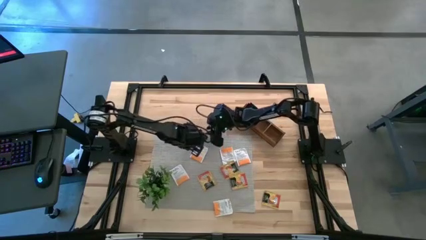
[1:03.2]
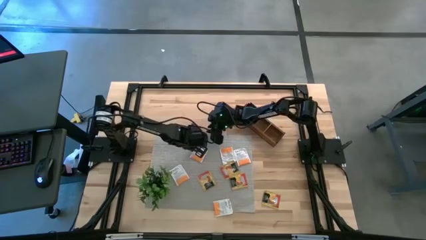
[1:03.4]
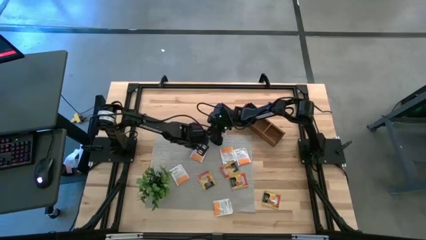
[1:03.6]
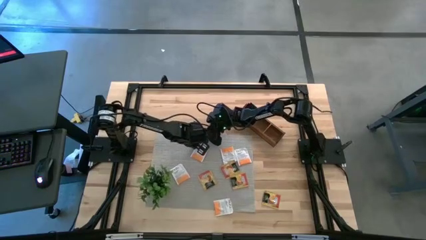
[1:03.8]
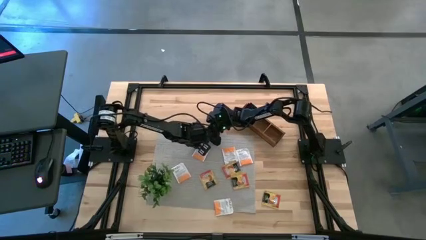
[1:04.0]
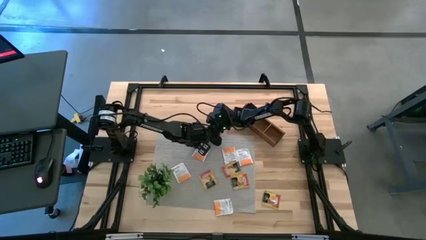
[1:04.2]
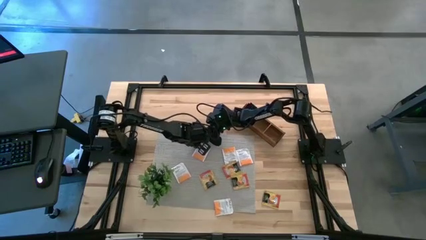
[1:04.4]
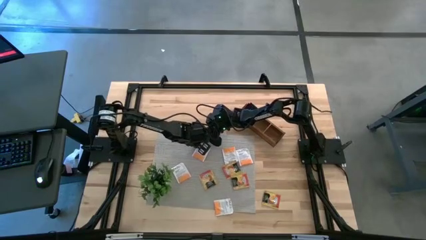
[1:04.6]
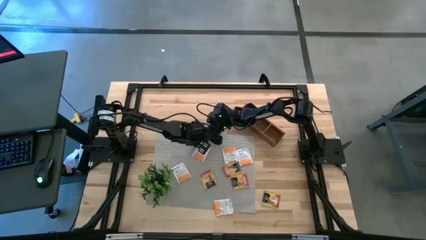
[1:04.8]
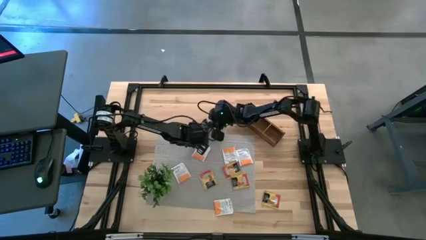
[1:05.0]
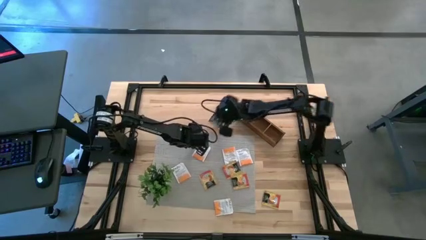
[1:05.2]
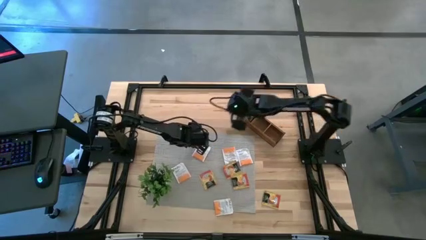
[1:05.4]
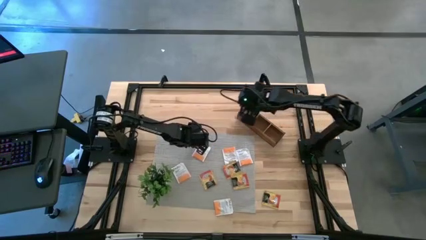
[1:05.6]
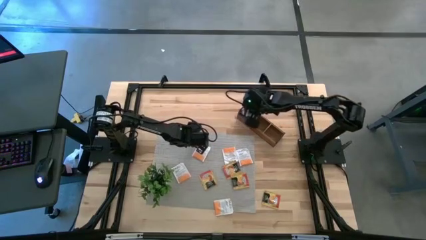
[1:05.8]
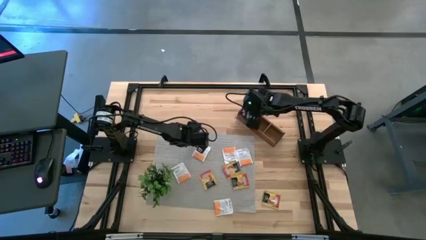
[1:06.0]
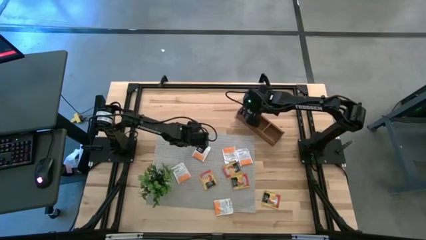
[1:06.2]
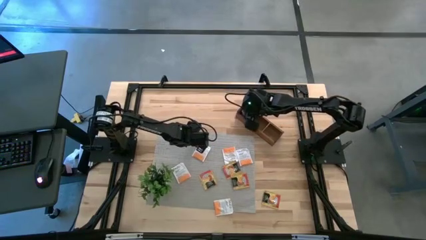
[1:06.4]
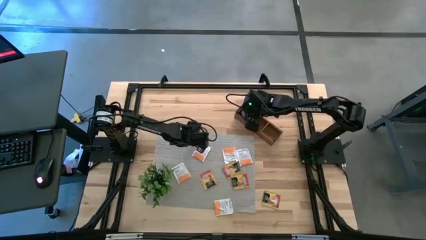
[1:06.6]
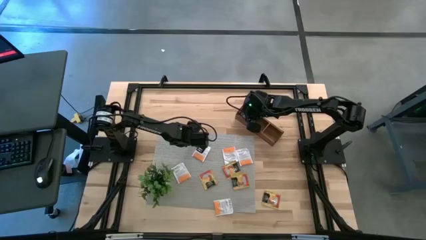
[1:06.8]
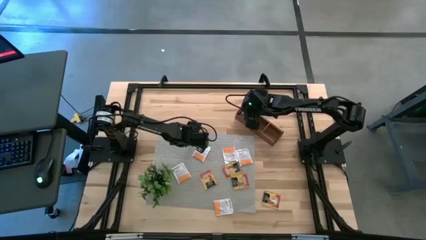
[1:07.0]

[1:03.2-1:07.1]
Task: Pick & Place Tea
Put the black tea bag into the left section of the wooden organizer

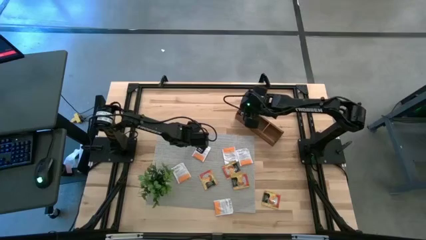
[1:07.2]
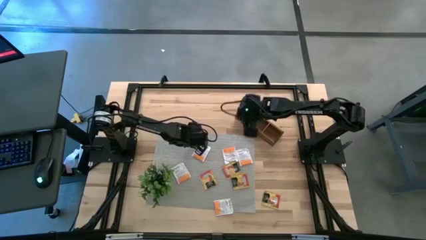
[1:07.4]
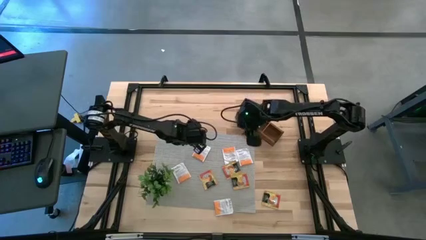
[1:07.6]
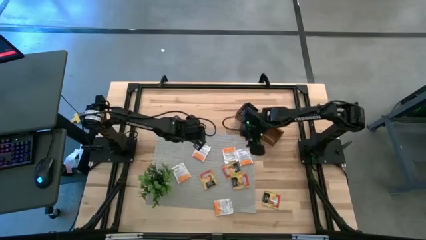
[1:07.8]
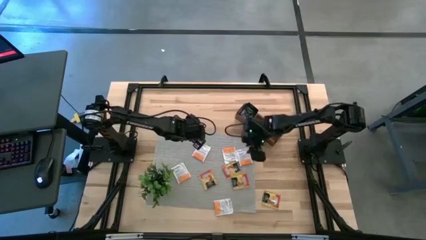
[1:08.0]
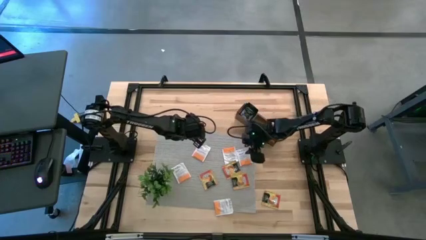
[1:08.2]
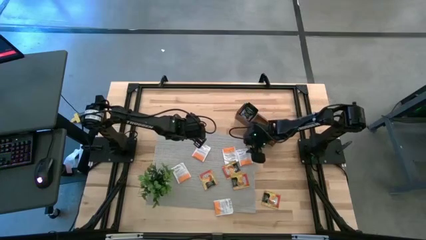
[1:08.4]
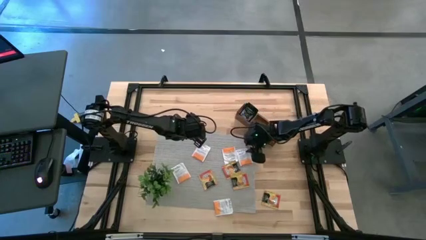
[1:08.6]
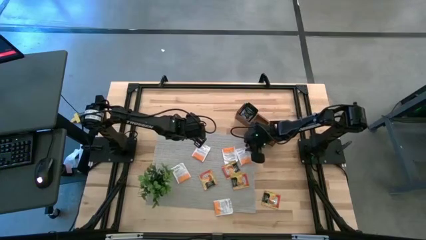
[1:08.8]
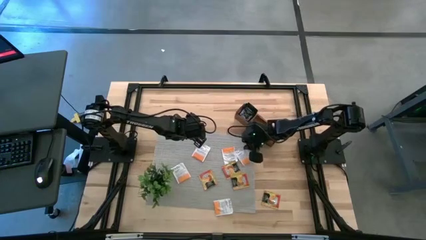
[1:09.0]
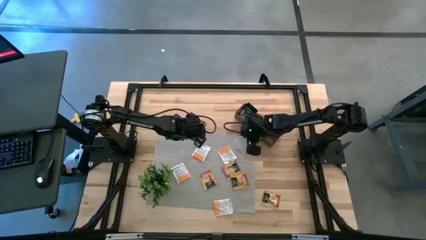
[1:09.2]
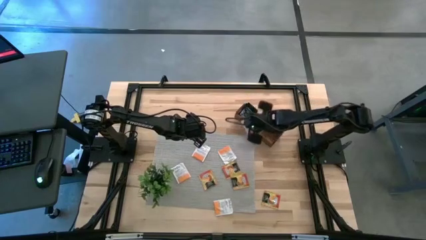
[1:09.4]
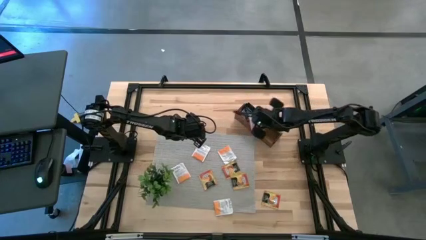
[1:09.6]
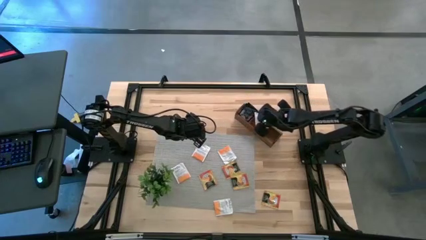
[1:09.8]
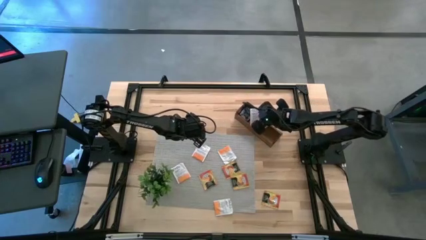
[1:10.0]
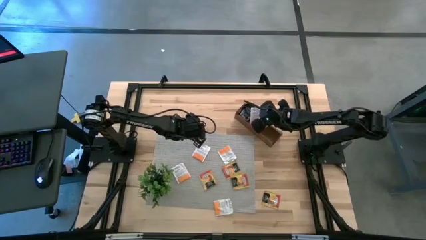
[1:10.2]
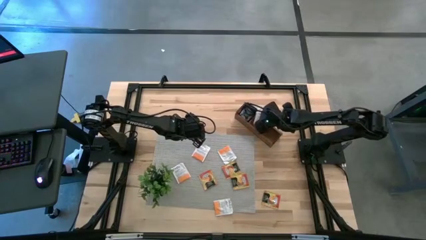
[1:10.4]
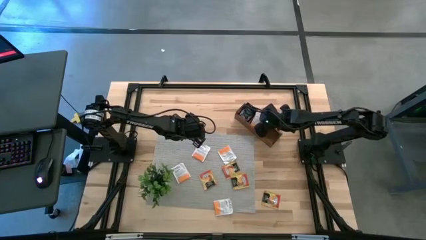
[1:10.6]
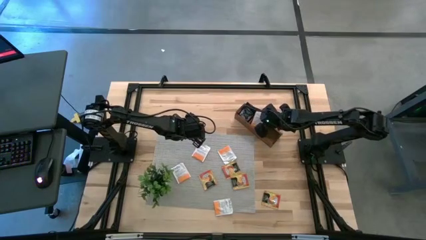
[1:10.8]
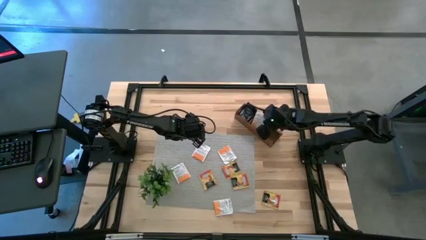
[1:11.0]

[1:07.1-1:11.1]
Put the orange tea bag into the middle section of the wooden organizer

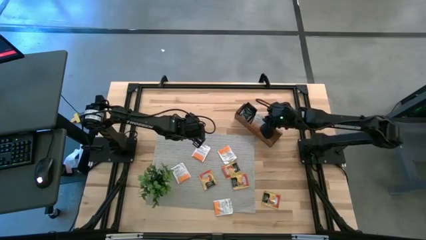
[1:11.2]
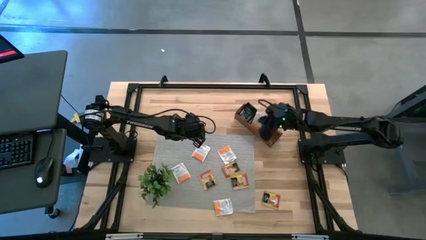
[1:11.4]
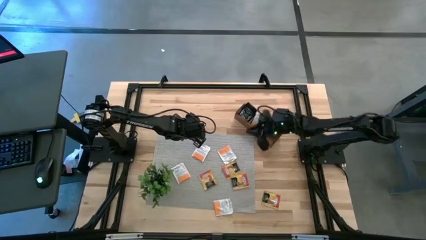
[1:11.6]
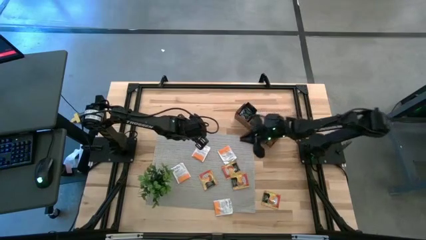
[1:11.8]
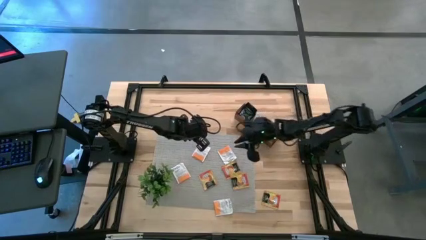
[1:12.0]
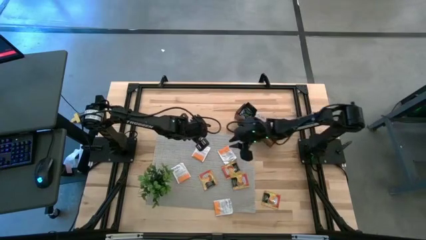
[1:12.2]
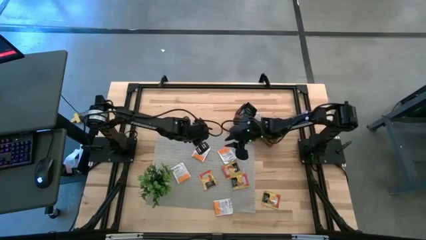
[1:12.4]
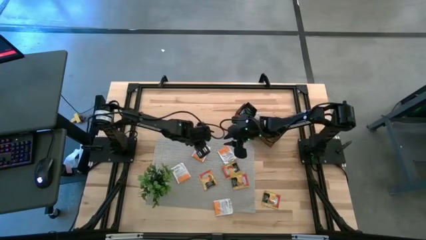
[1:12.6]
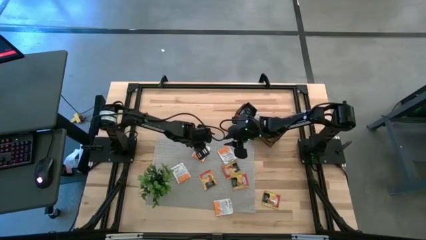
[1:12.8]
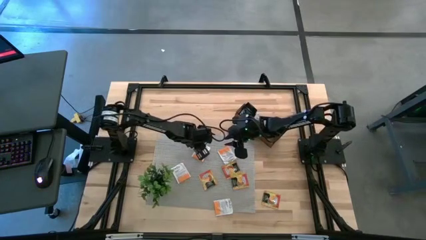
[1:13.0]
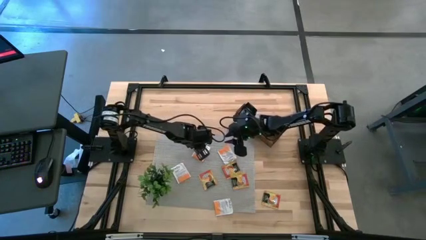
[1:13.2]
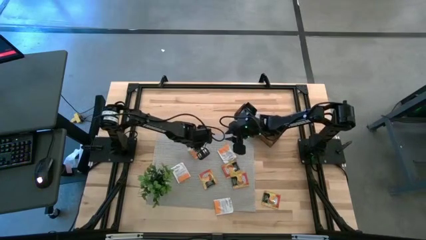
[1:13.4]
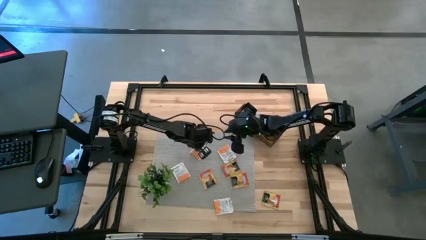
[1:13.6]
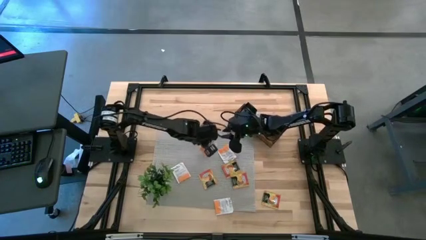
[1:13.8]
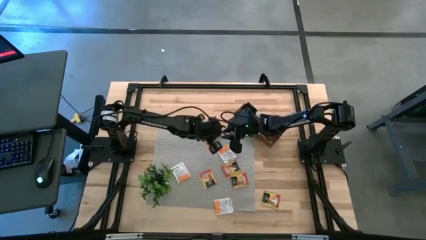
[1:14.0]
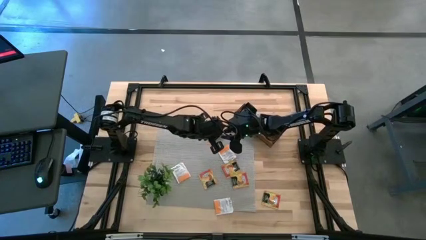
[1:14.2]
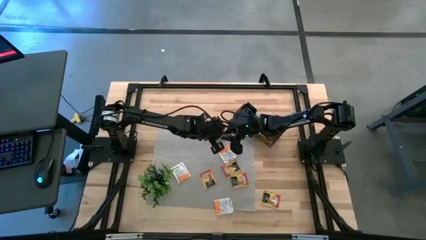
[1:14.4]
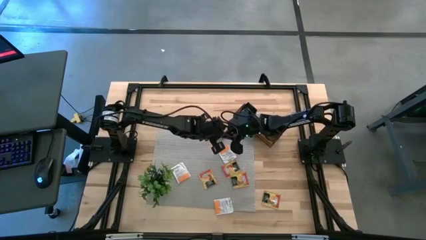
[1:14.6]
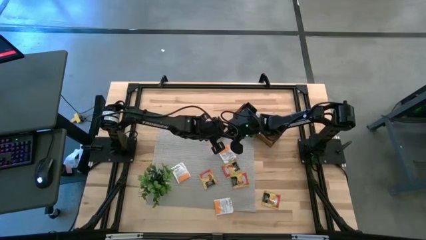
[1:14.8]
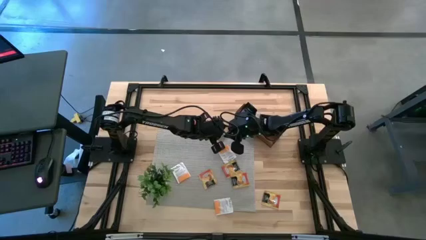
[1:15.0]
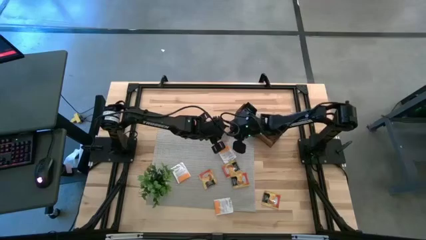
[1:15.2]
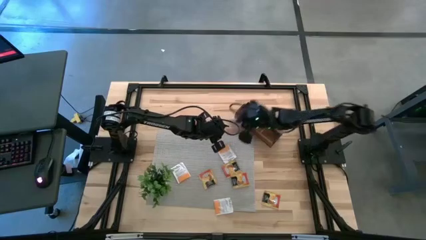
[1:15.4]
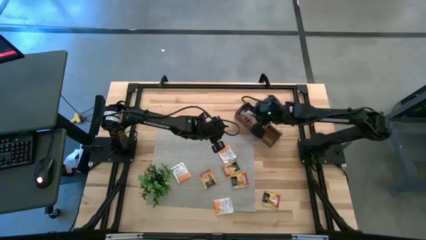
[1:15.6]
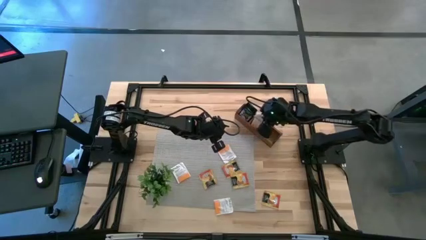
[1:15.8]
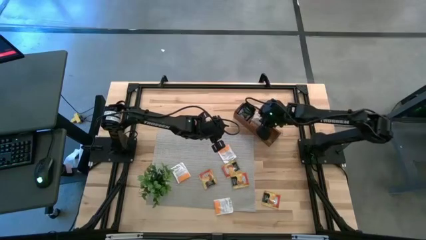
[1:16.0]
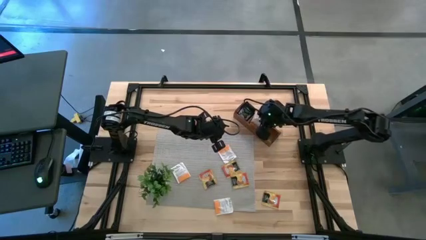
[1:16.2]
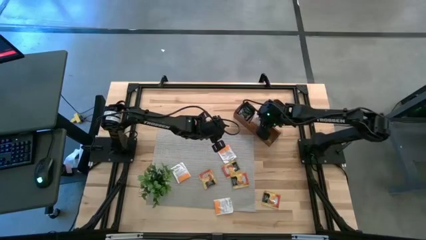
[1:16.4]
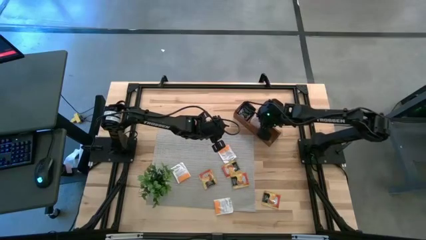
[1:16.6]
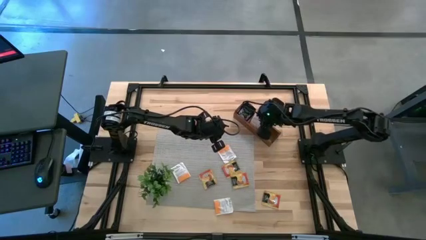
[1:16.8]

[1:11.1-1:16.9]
Put the orange tea bag into the middle section of the wooden organizer

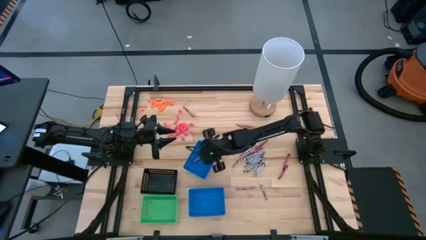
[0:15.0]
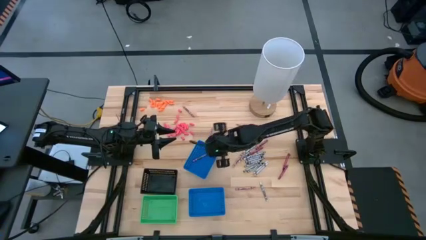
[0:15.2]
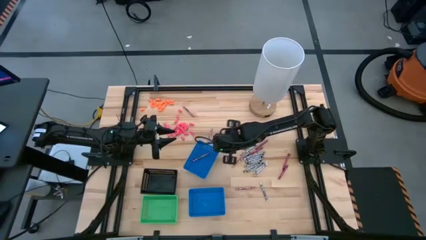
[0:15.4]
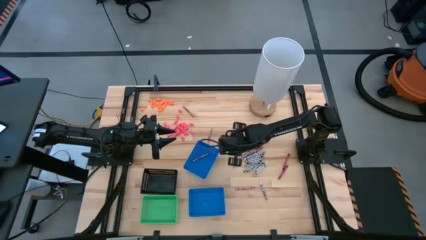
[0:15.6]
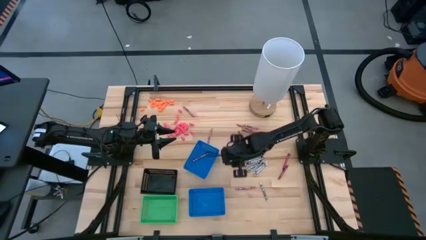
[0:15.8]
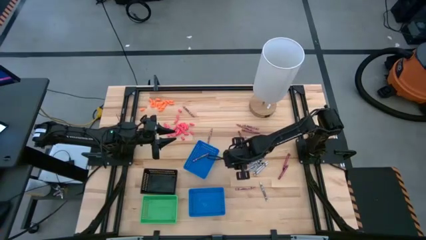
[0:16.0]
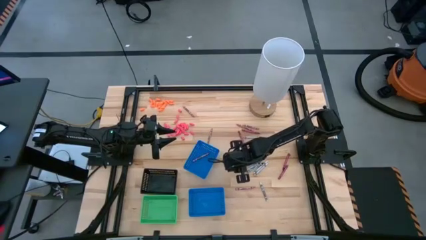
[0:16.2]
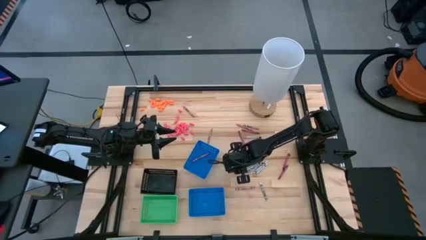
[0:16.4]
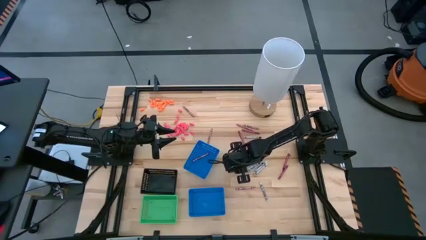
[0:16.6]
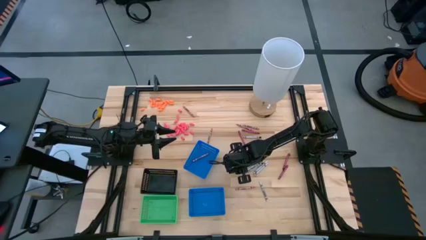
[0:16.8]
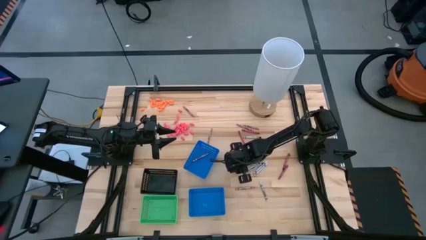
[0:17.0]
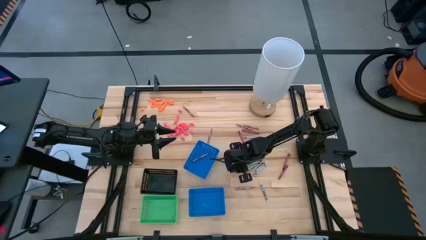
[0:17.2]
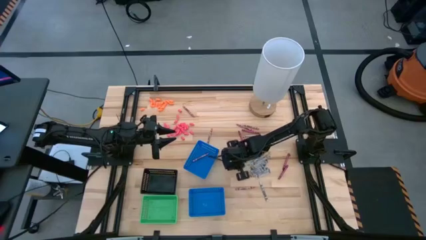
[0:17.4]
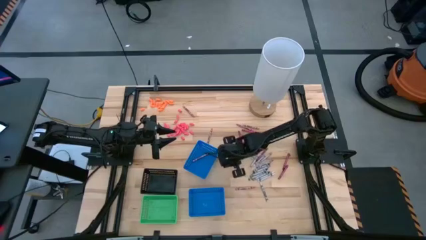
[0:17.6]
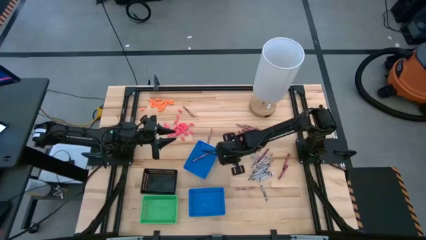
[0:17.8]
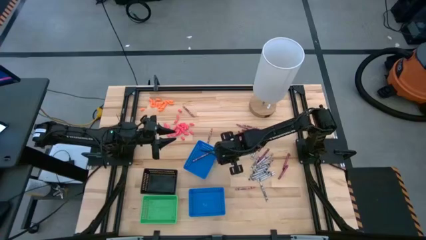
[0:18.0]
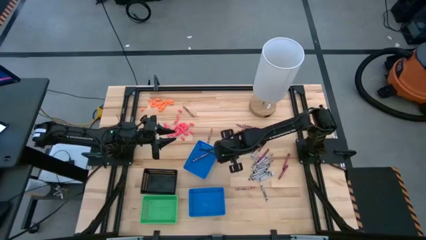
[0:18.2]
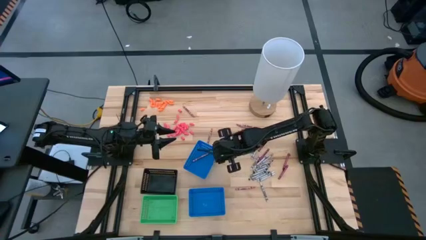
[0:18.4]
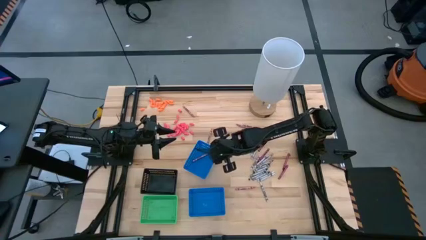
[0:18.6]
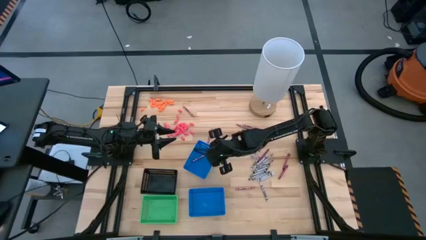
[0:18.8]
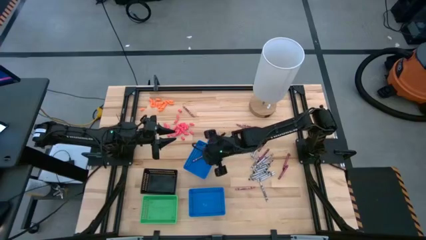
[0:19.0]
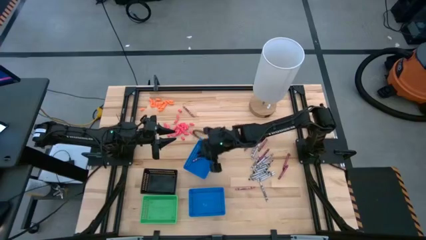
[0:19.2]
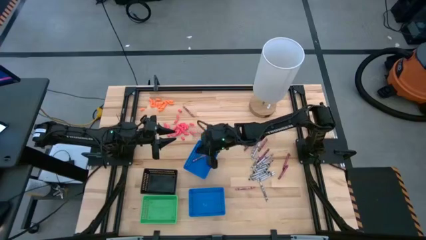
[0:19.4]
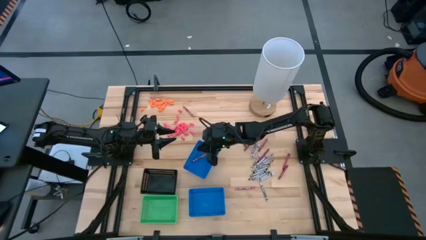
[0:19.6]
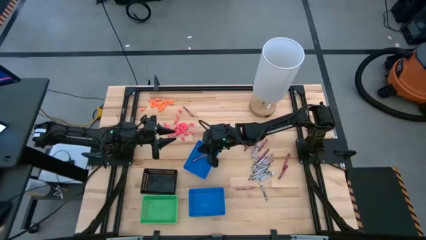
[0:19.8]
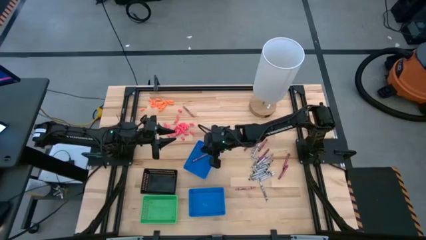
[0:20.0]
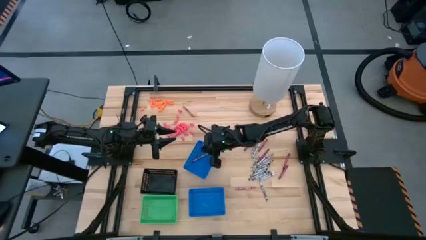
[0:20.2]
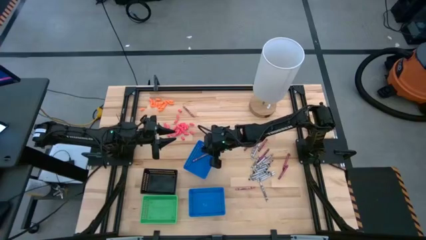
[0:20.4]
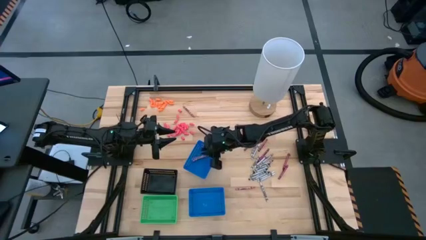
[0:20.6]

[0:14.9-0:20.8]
Task: Sort crayons
Put the pink crayon into the top blue bin
